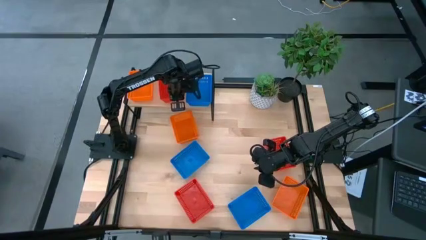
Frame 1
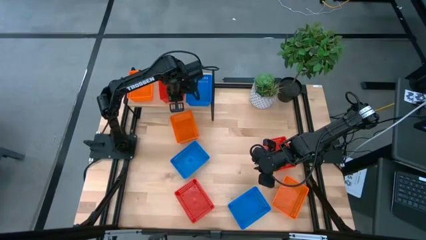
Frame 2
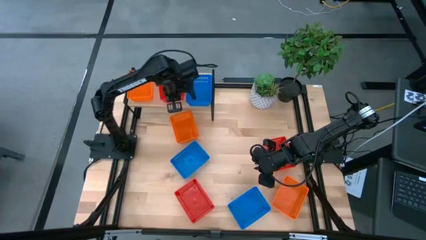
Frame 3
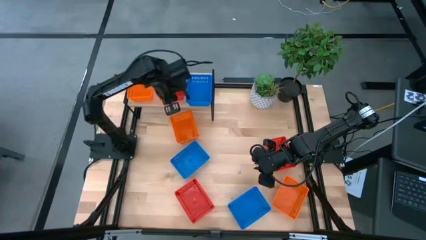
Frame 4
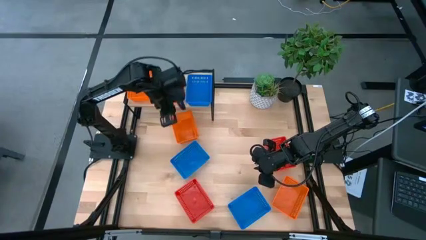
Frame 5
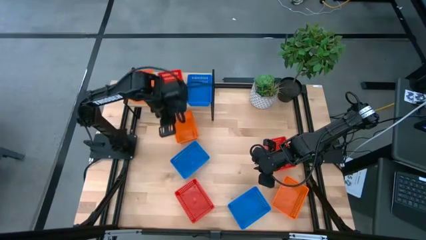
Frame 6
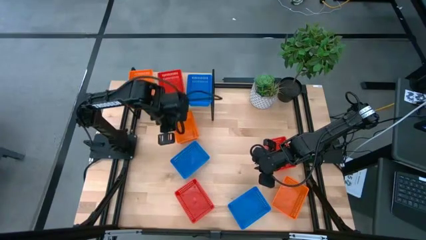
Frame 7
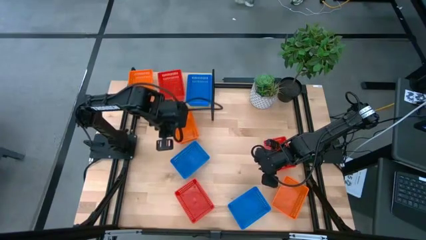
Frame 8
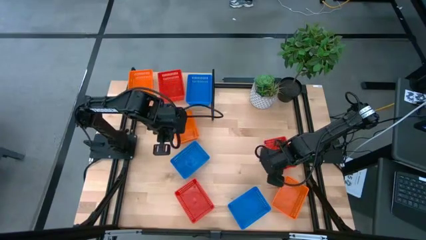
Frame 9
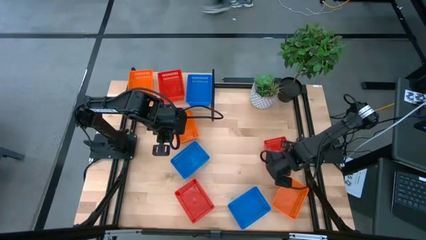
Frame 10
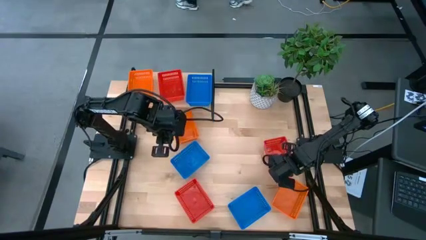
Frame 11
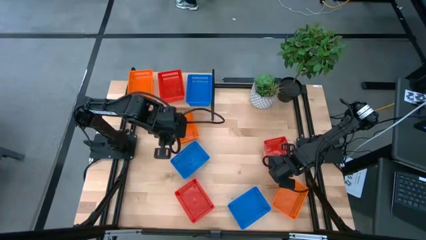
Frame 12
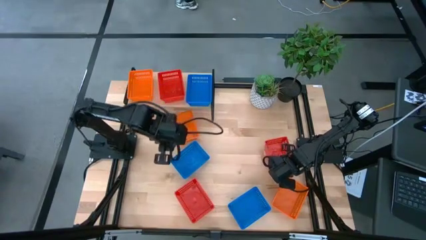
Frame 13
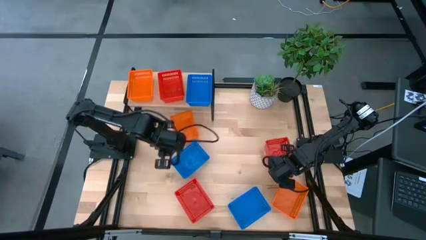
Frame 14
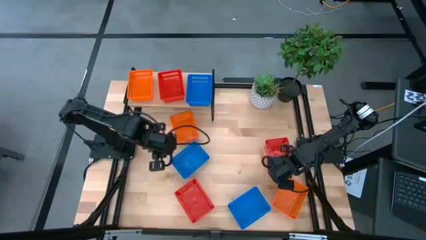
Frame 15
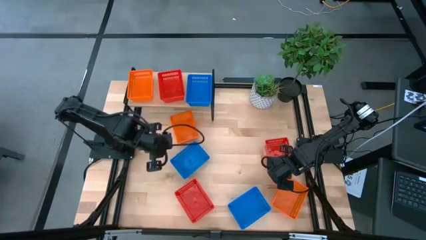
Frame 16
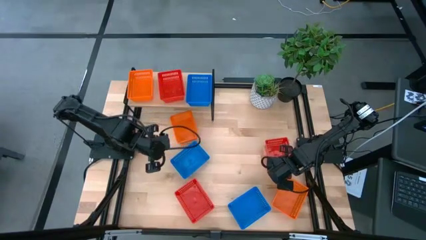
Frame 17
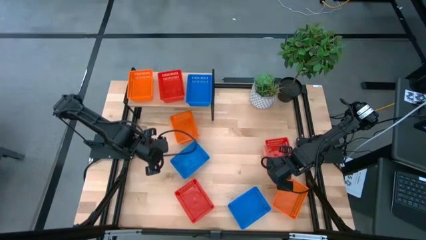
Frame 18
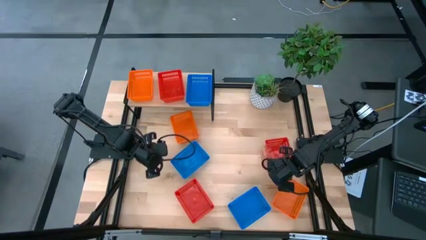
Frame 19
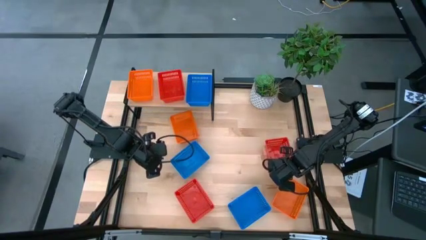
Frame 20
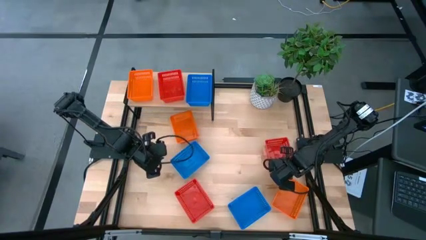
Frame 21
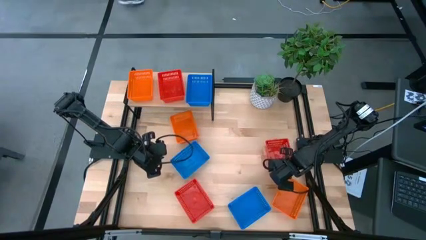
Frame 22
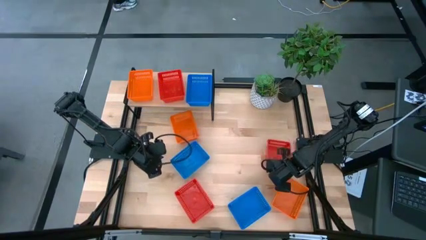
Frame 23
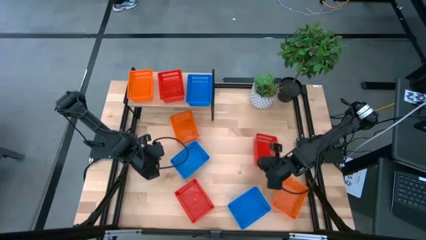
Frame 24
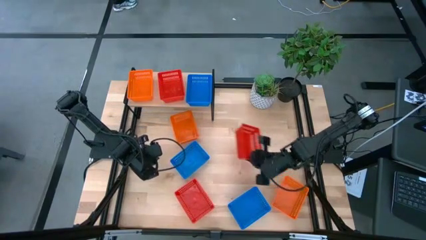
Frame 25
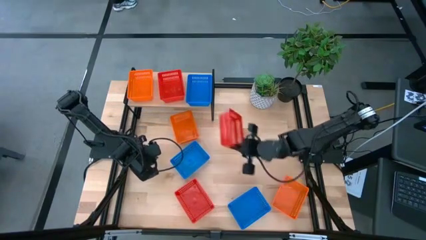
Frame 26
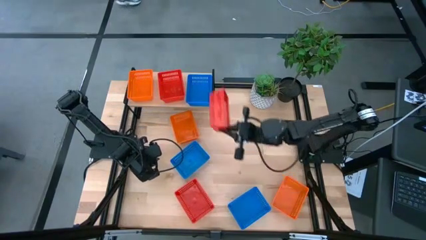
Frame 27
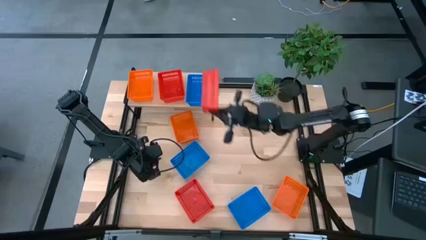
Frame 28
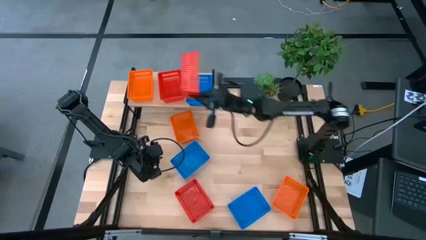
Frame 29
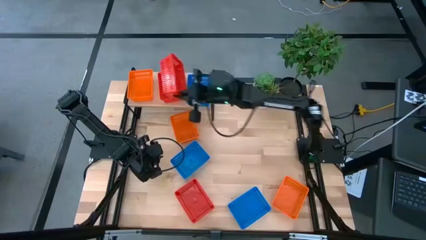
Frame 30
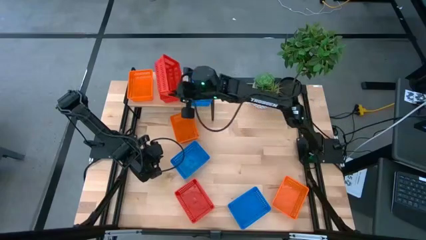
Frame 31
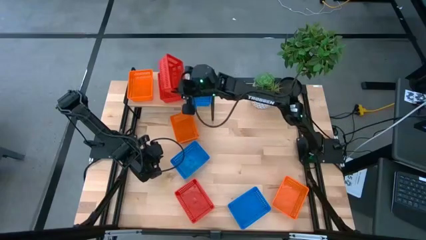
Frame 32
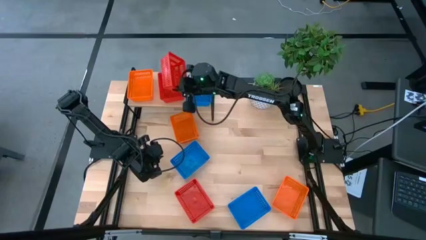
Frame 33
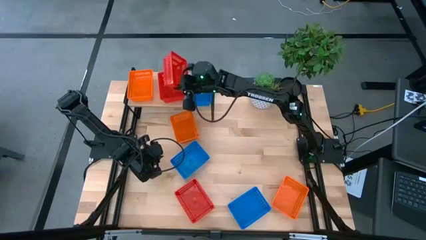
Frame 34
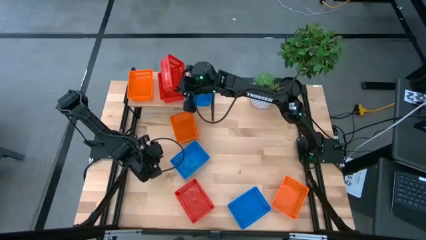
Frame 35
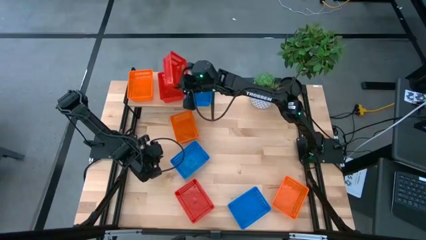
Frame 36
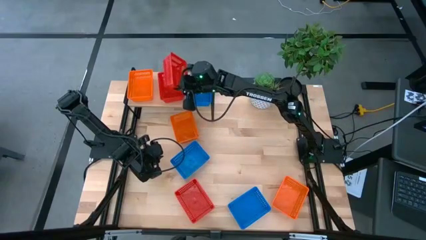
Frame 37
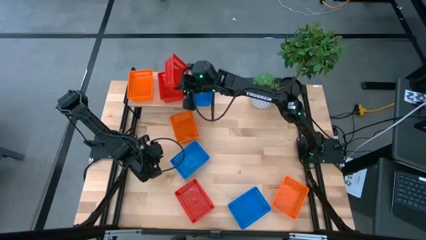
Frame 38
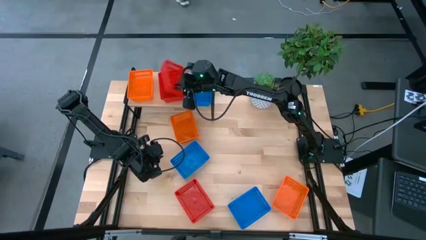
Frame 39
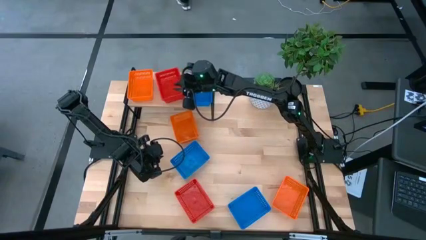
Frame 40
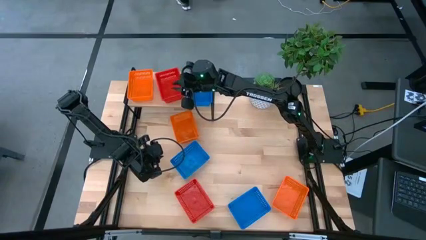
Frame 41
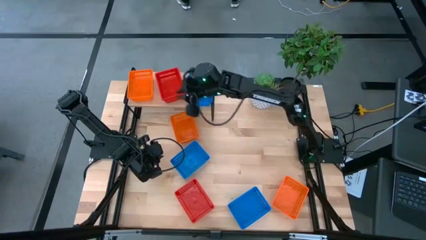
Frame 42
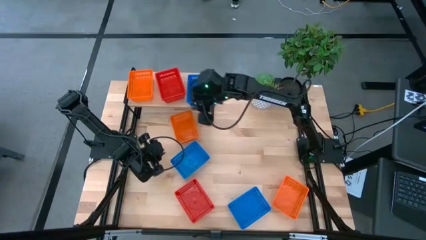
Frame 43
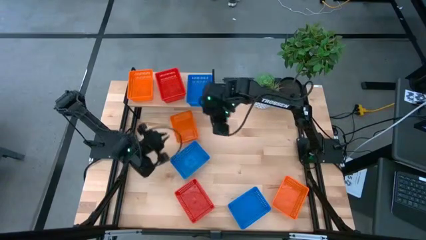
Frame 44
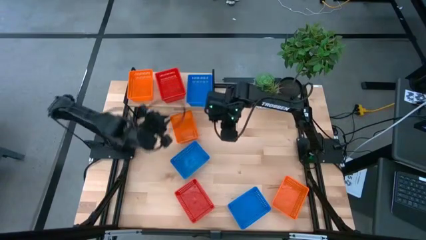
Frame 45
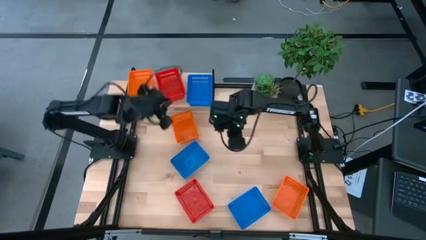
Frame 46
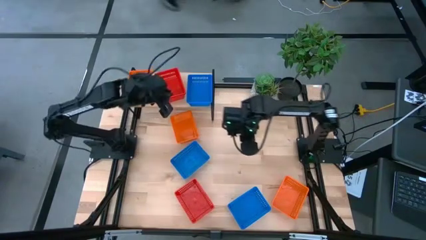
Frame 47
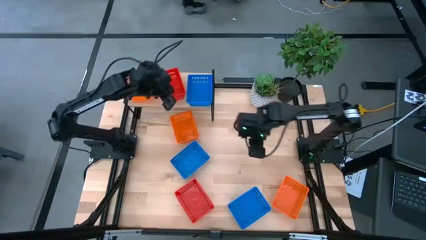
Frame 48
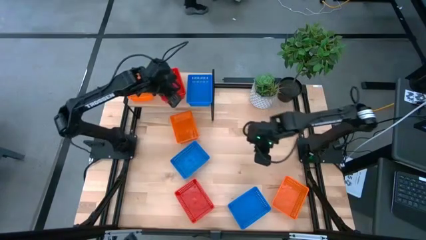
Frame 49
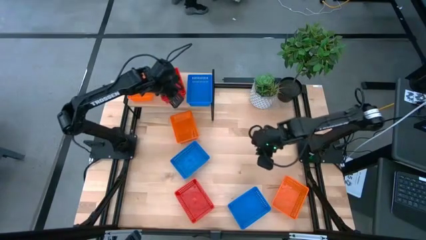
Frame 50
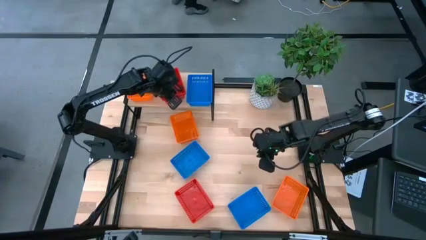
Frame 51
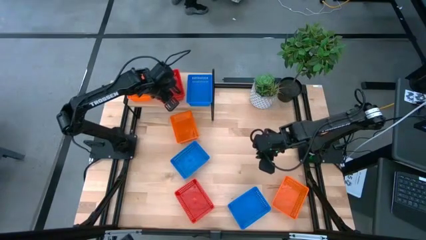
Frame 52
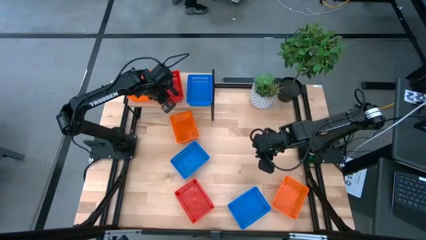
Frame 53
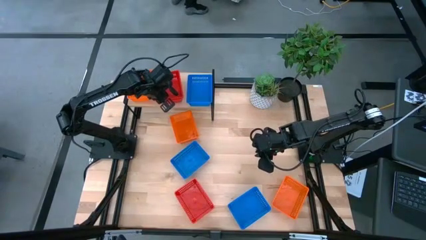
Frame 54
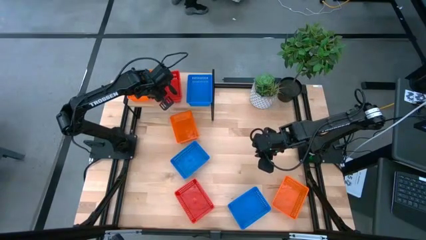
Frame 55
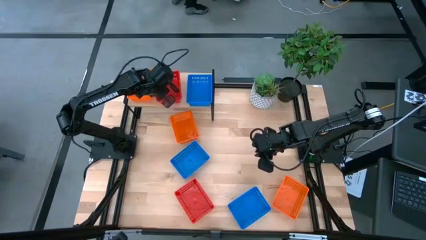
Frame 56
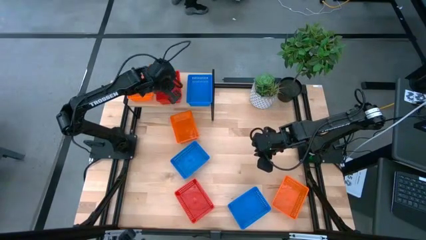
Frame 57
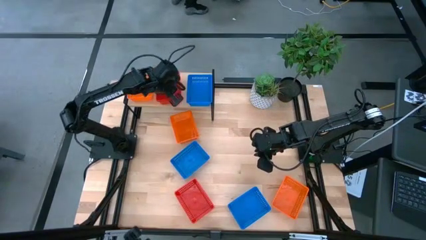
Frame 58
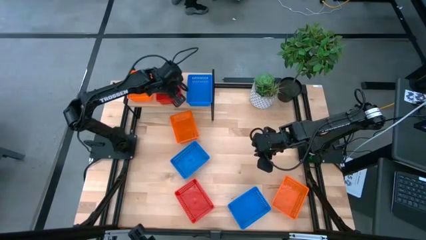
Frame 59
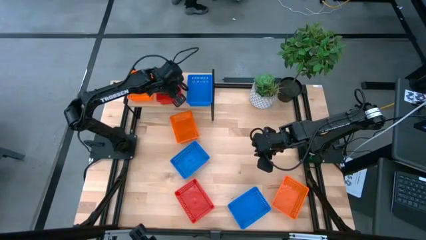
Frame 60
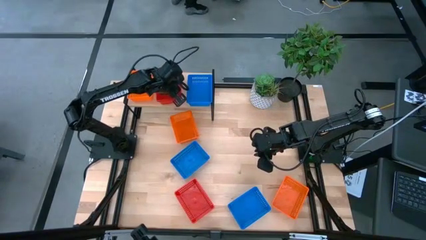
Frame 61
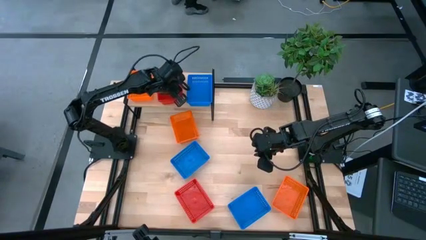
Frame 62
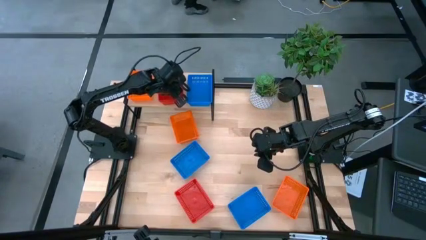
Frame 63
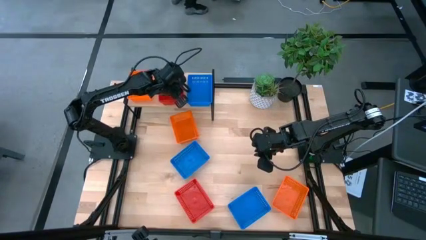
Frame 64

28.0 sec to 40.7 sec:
Task: Stack baskets on shelf by color
Stack the top red bin on top of the red bin on the shelf
